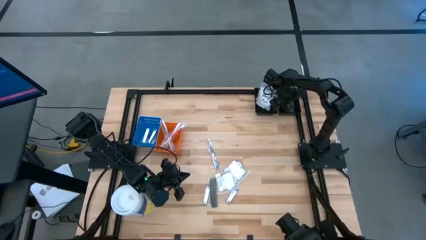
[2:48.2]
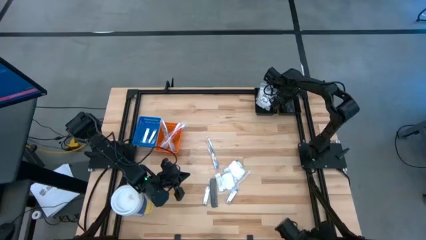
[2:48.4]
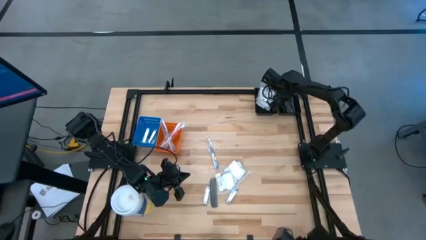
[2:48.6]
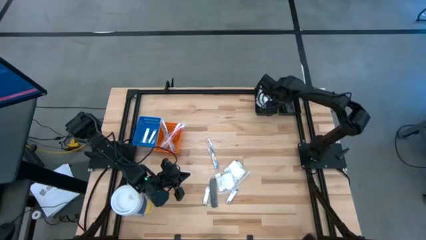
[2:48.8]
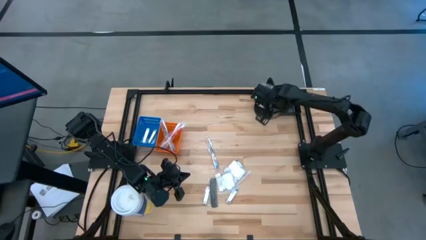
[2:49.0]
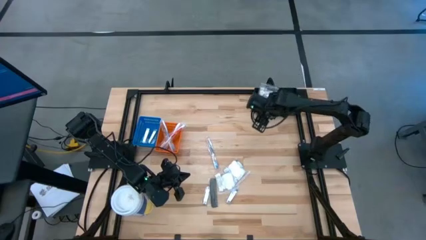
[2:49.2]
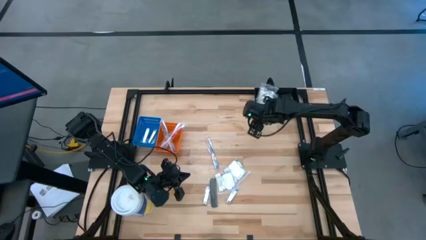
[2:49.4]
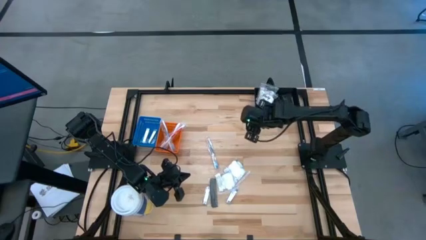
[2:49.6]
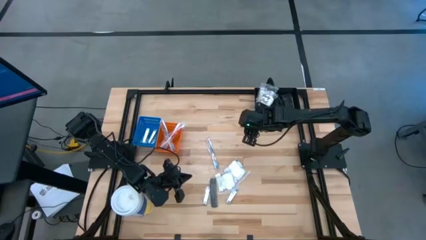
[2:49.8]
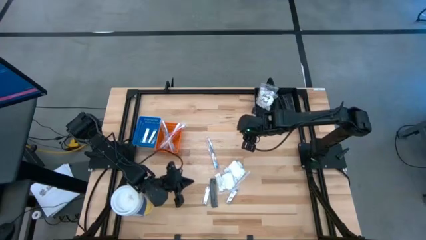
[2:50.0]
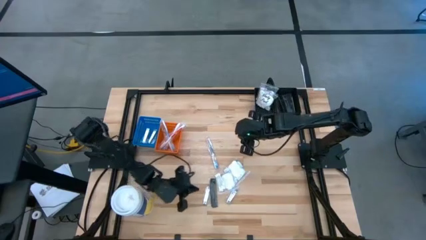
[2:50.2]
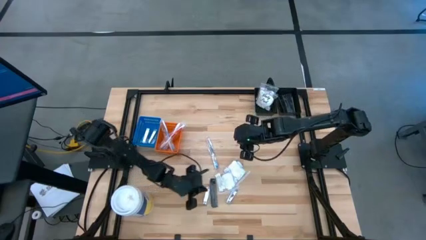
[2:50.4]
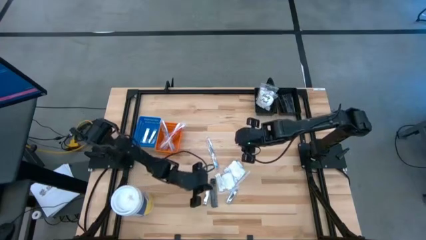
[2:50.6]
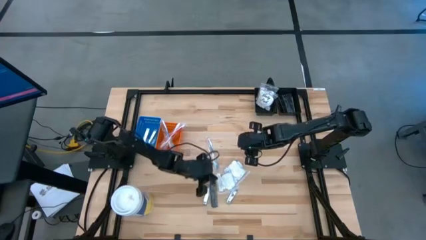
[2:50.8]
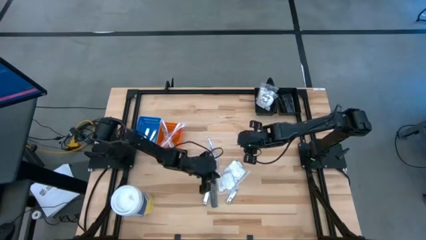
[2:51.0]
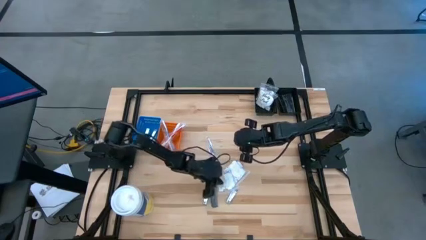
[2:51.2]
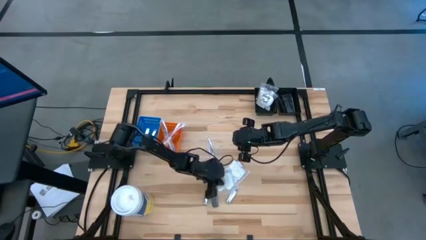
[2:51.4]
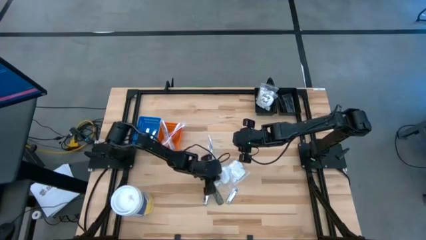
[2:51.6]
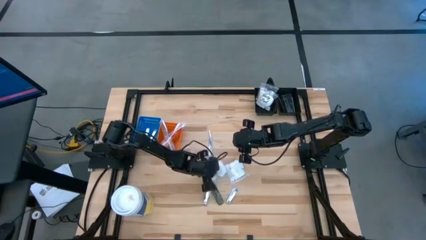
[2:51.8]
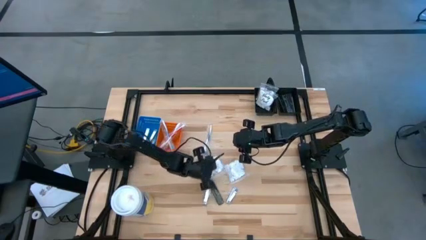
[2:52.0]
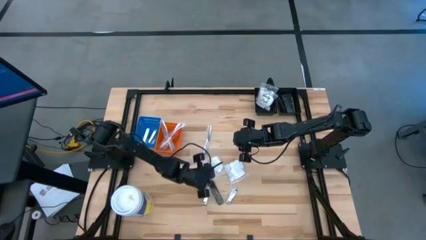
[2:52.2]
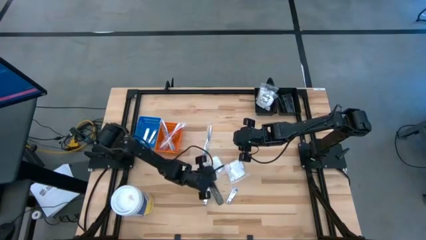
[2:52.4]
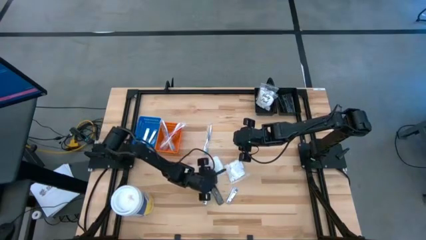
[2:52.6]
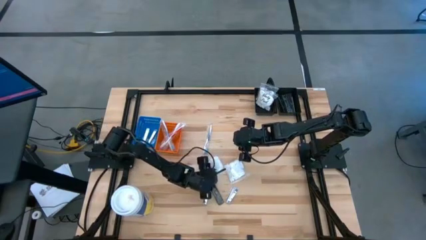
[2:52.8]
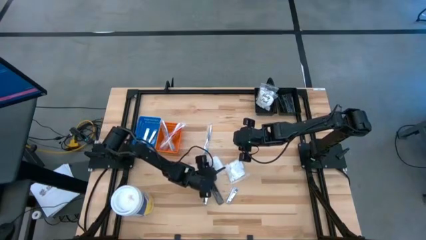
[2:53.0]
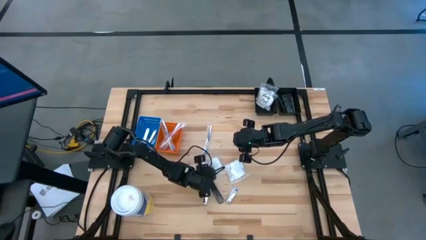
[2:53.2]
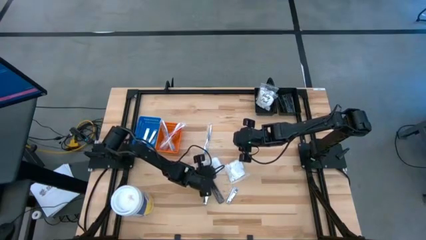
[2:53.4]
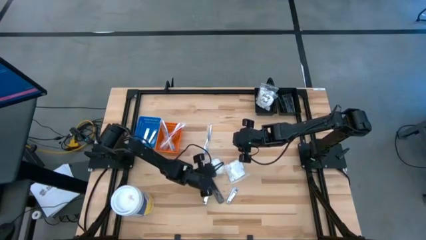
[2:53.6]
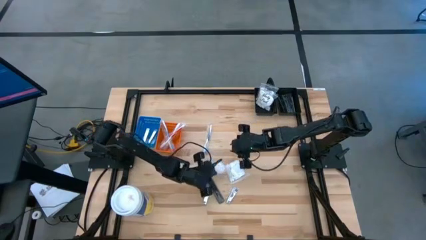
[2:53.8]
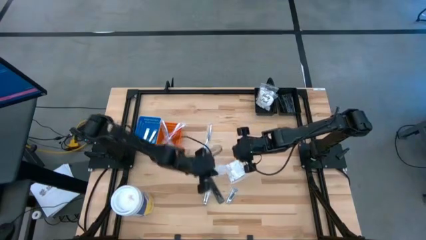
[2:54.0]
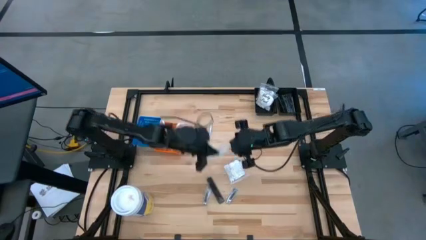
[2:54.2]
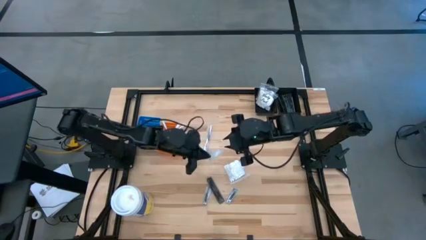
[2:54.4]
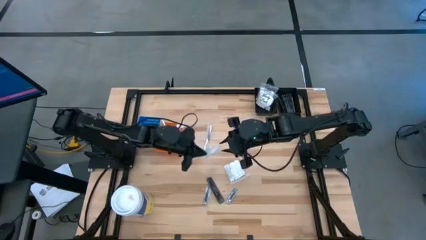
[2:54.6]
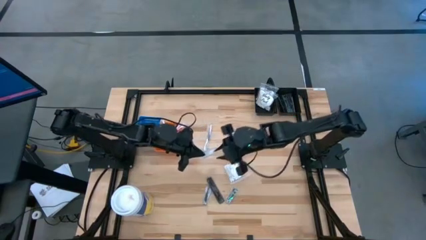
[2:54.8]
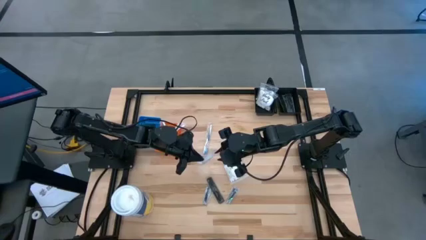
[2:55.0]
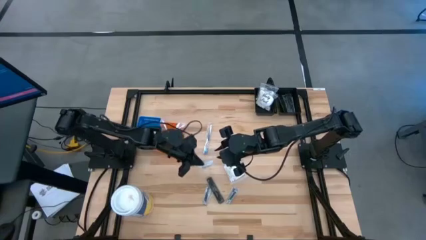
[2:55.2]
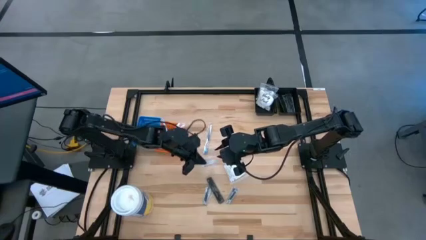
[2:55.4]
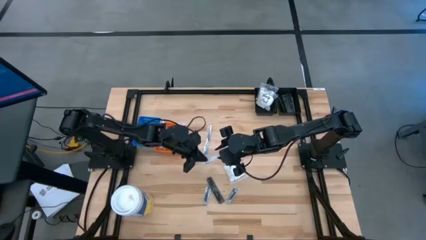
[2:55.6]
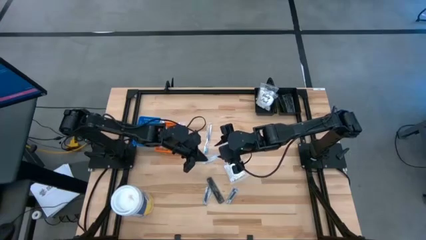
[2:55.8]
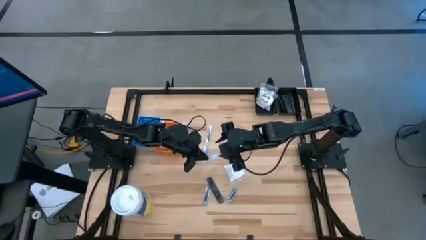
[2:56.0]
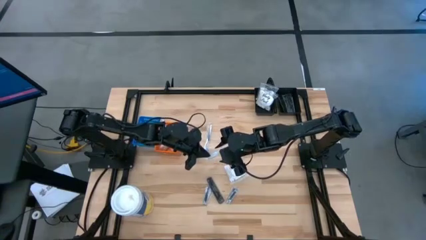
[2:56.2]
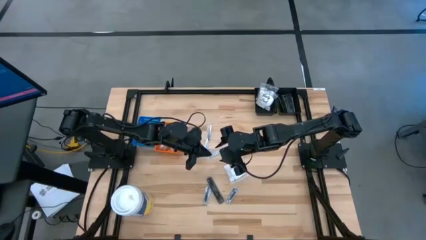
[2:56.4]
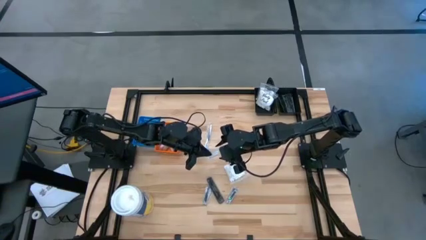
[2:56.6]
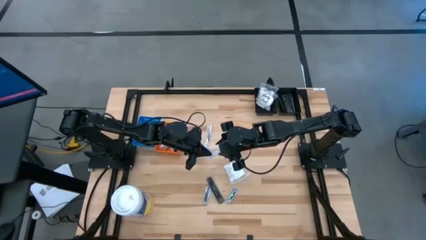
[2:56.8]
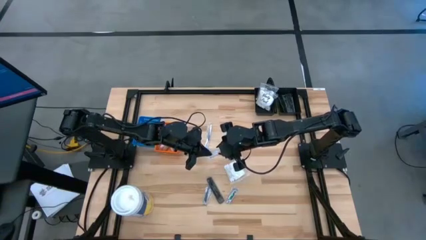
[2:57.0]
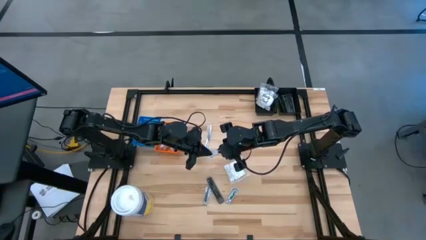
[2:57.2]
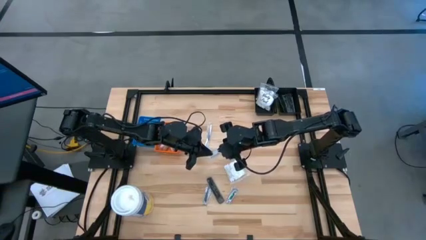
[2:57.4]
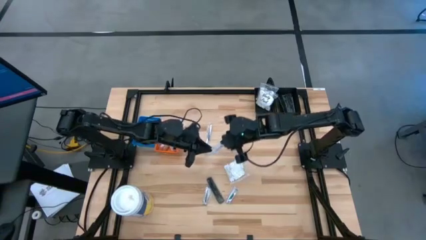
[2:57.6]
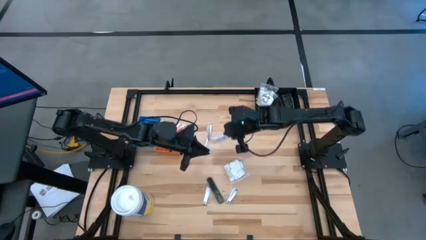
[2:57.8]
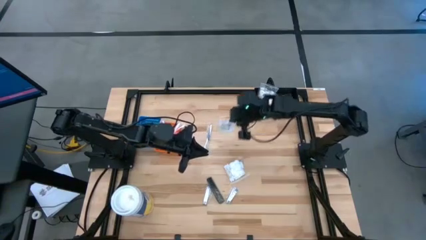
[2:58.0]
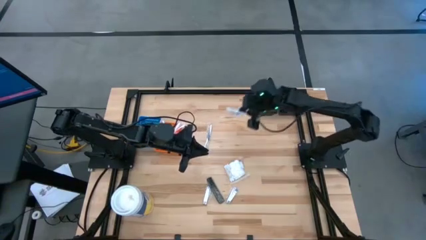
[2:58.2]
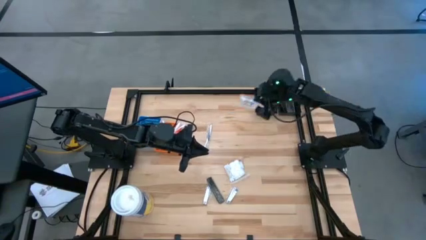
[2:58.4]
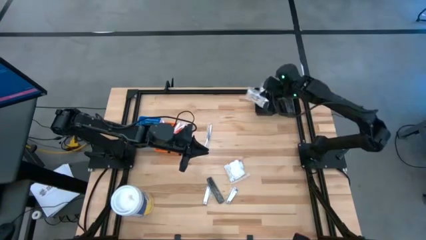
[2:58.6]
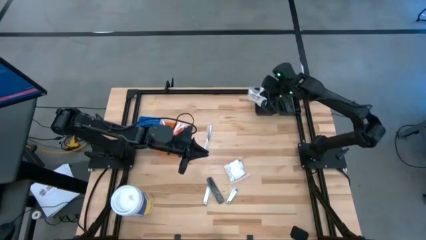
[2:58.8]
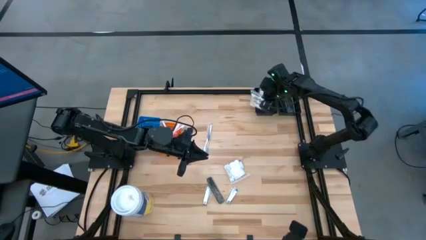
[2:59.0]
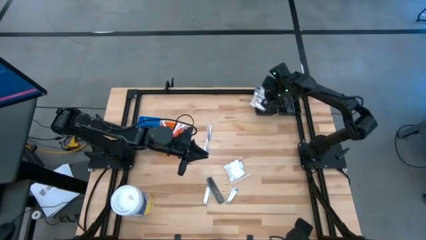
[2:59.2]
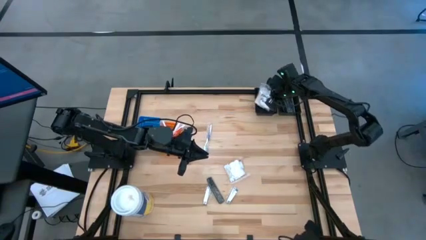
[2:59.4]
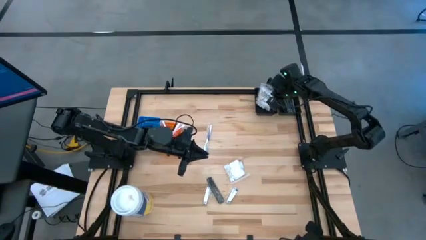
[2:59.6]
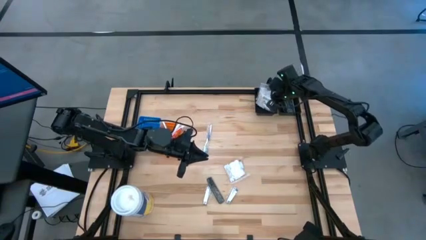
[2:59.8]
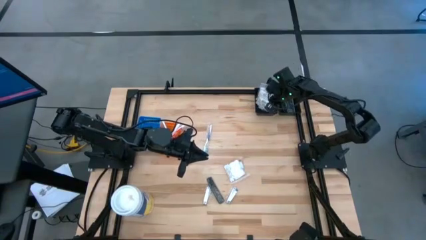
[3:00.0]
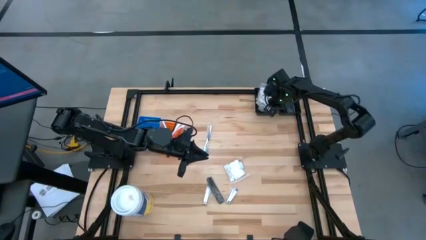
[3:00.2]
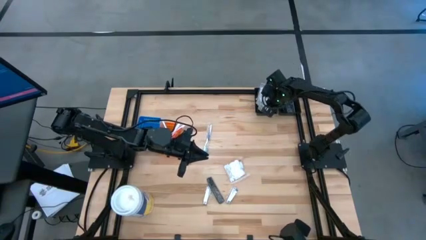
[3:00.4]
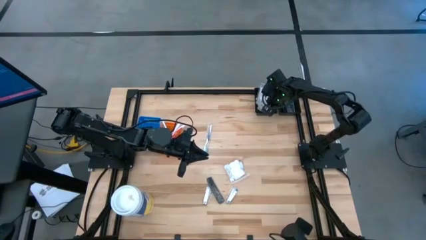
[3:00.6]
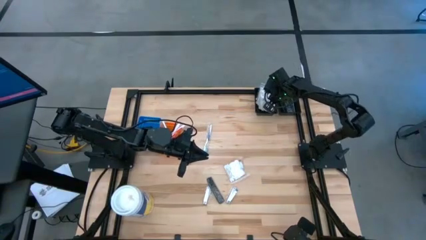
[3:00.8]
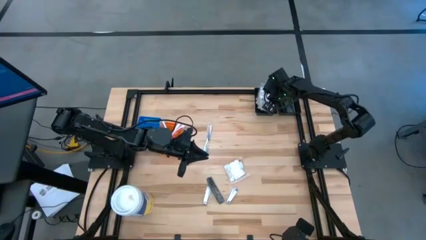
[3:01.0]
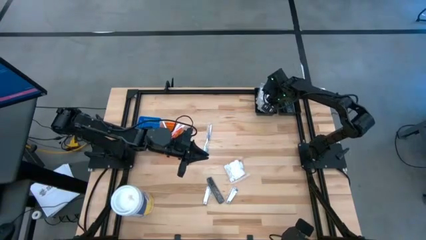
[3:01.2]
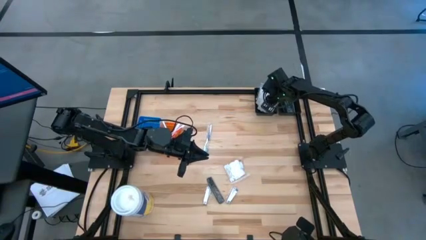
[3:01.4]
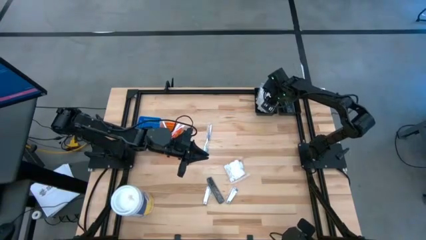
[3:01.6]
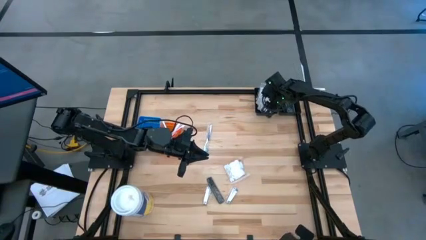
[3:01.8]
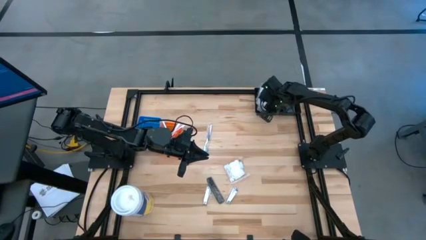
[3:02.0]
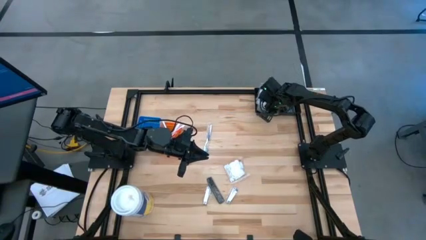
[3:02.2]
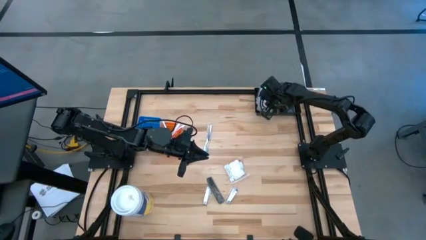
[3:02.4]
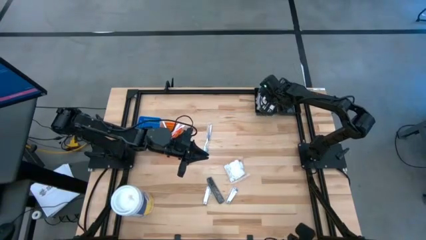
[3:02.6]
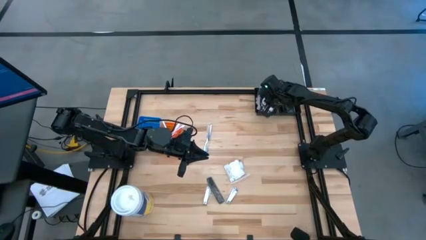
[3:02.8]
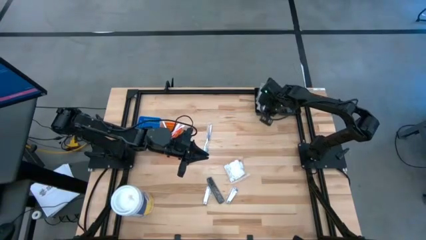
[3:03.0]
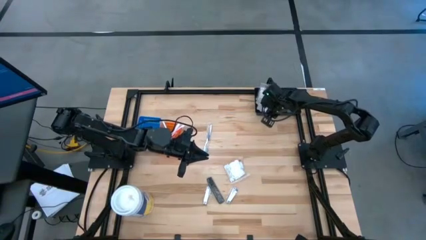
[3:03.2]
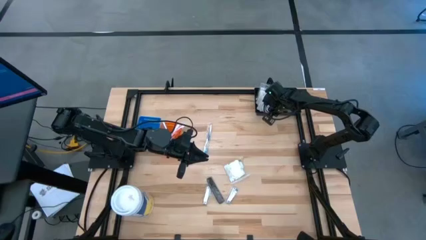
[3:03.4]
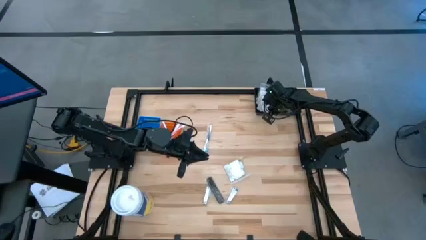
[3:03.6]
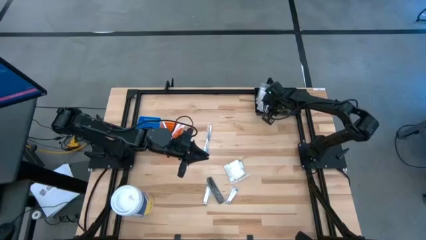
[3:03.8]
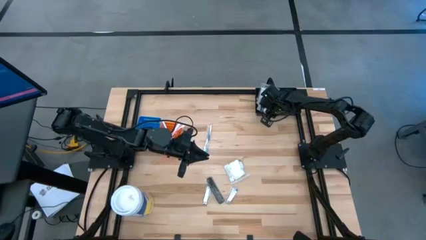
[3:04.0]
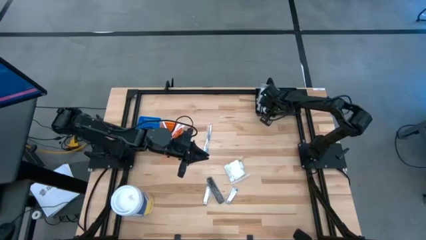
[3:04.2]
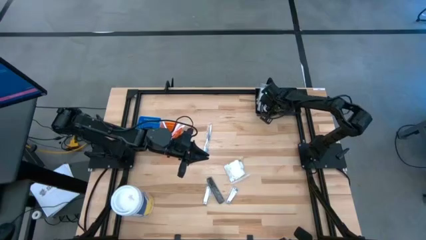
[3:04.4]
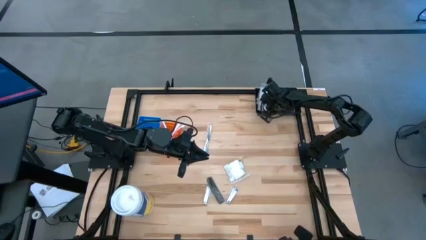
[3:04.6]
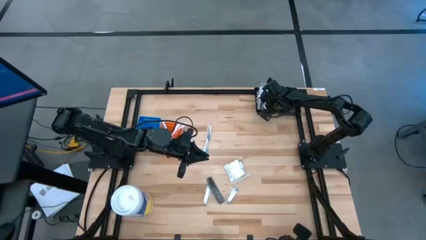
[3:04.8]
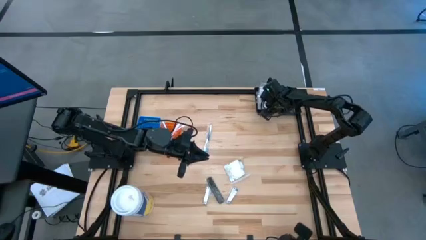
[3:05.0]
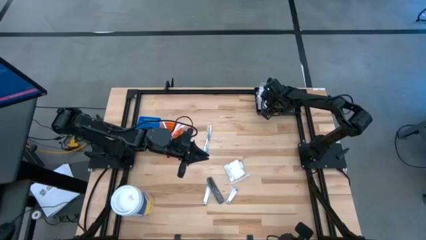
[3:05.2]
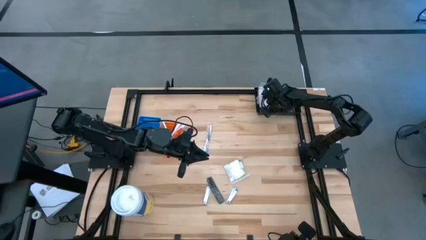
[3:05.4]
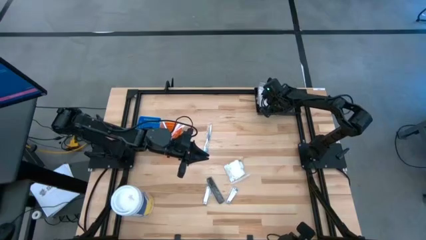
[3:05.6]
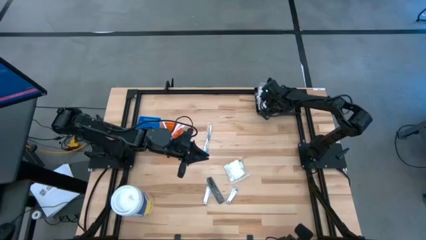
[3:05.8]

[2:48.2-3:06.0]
Task: Pick & Place Travel size toiletries
Put the cotton pack into the left black bin
